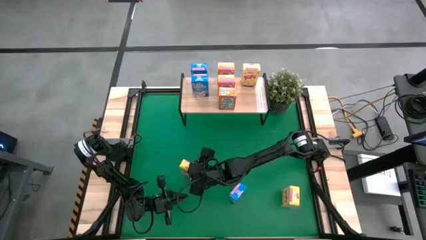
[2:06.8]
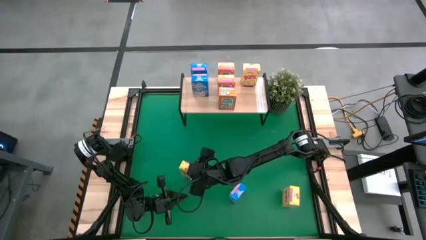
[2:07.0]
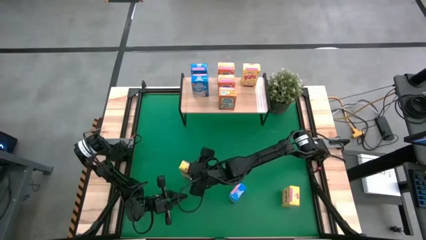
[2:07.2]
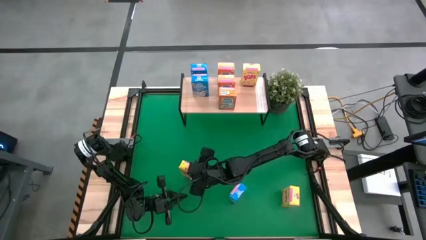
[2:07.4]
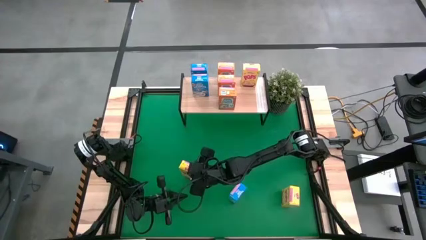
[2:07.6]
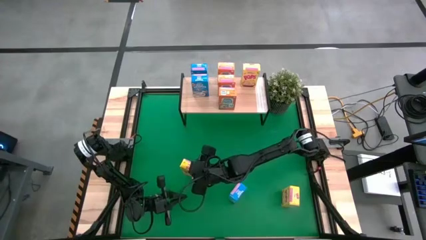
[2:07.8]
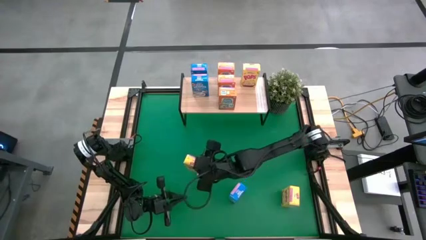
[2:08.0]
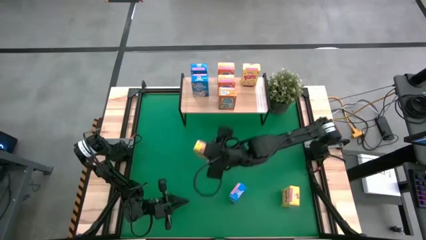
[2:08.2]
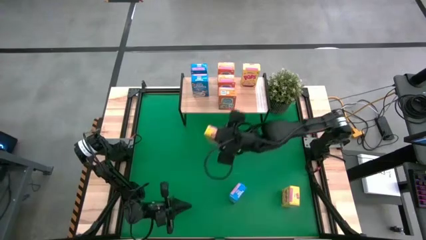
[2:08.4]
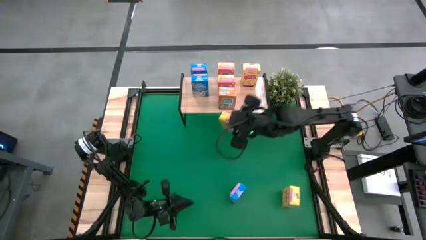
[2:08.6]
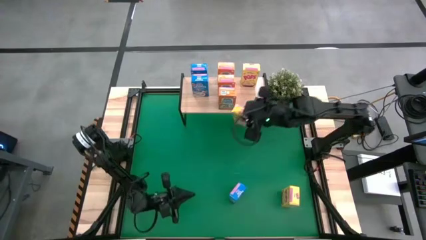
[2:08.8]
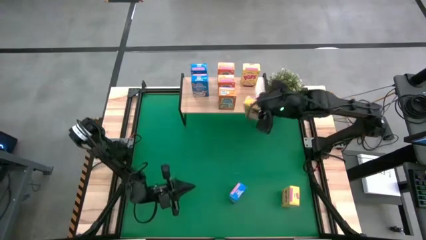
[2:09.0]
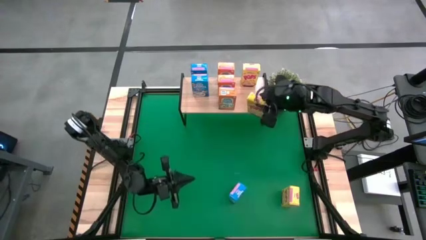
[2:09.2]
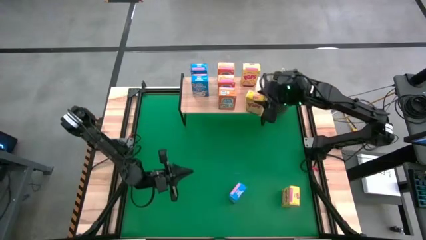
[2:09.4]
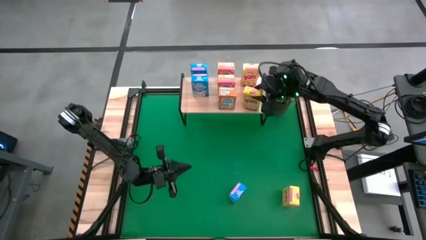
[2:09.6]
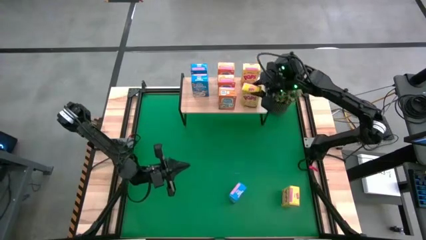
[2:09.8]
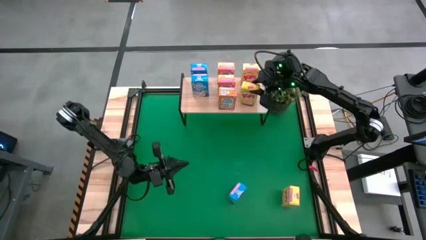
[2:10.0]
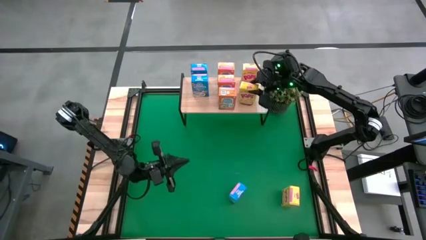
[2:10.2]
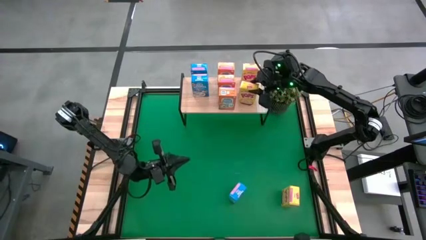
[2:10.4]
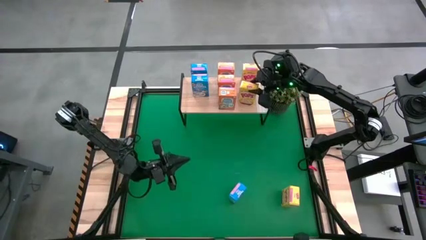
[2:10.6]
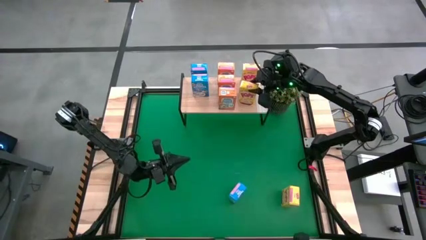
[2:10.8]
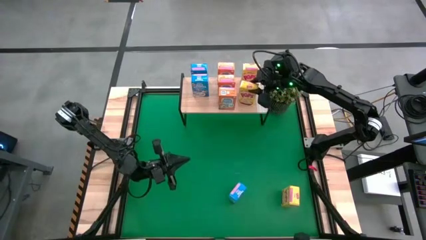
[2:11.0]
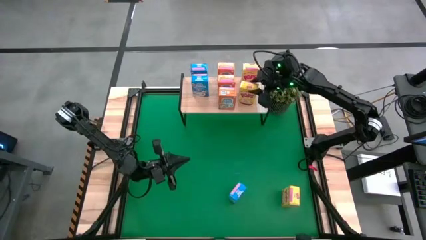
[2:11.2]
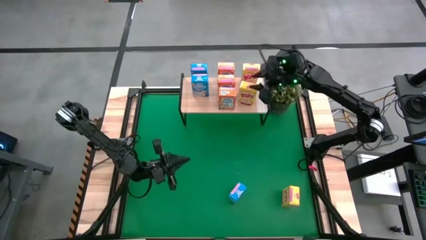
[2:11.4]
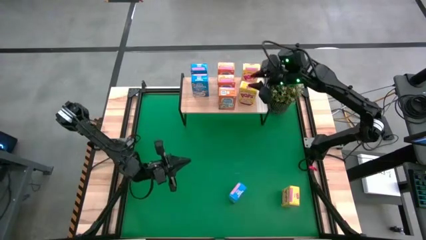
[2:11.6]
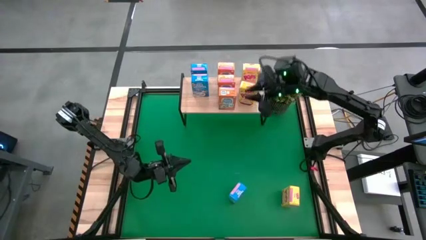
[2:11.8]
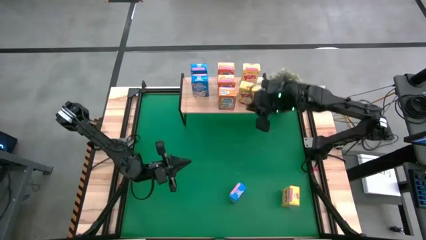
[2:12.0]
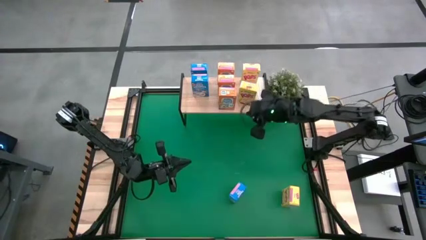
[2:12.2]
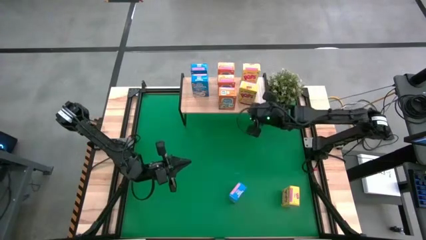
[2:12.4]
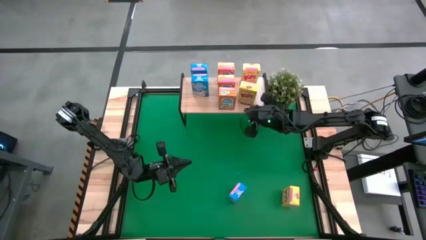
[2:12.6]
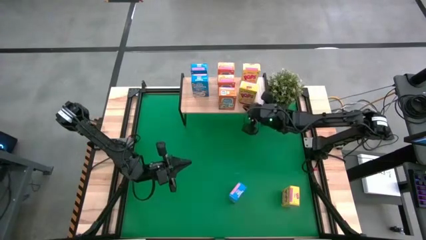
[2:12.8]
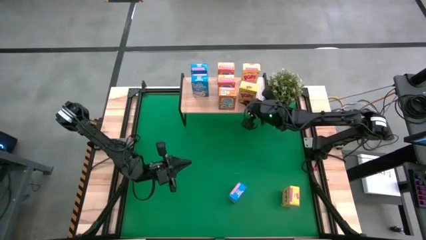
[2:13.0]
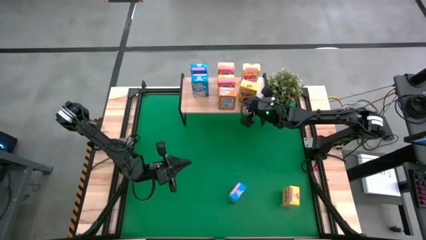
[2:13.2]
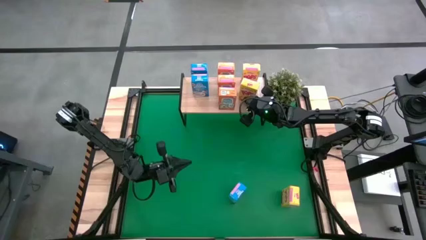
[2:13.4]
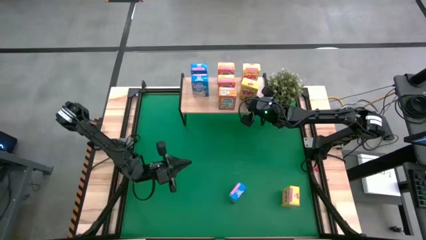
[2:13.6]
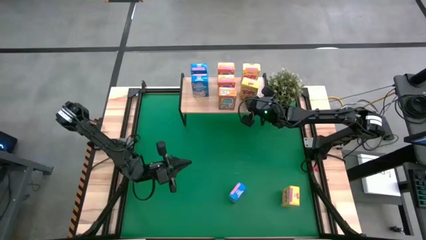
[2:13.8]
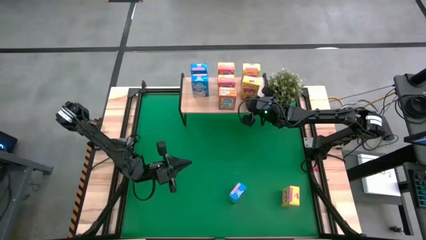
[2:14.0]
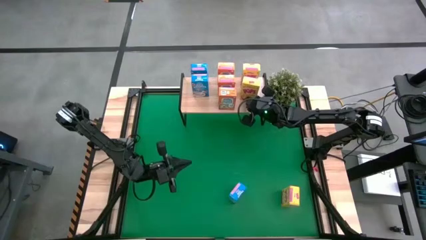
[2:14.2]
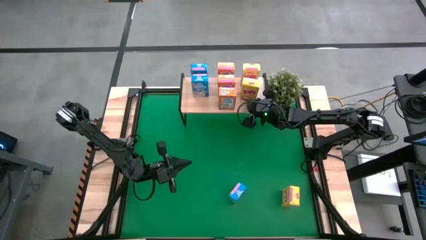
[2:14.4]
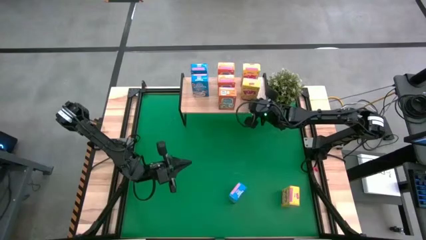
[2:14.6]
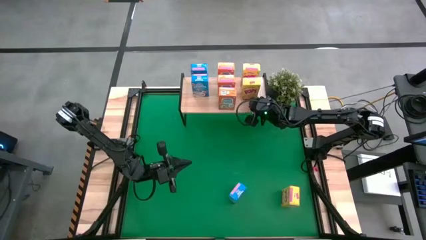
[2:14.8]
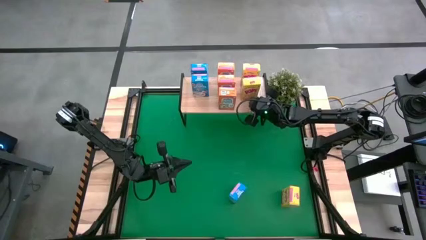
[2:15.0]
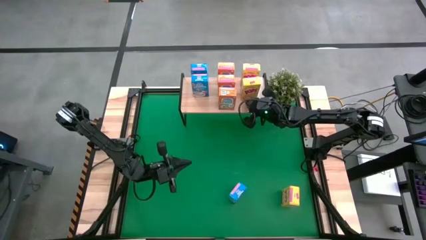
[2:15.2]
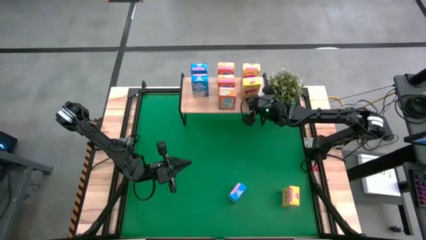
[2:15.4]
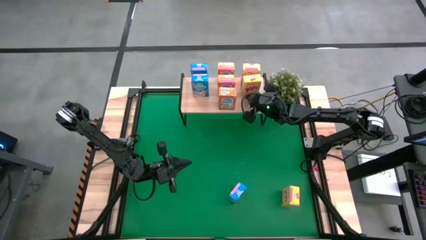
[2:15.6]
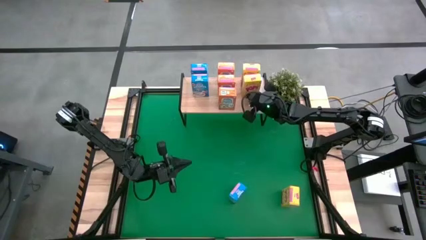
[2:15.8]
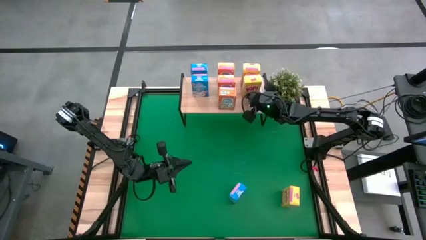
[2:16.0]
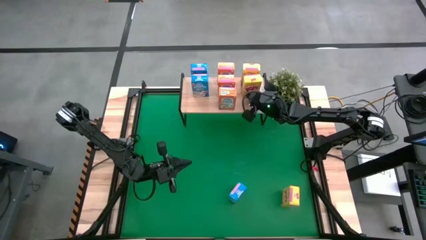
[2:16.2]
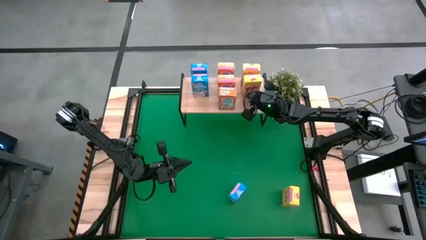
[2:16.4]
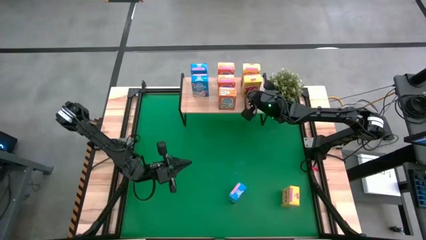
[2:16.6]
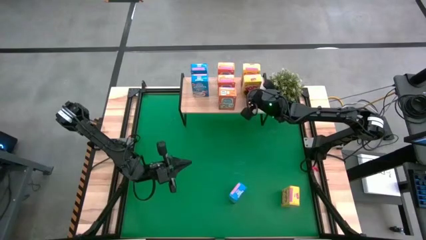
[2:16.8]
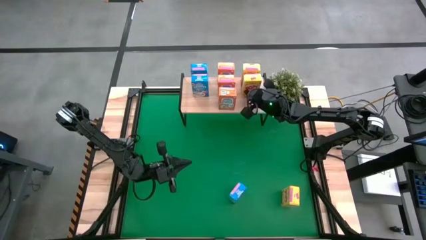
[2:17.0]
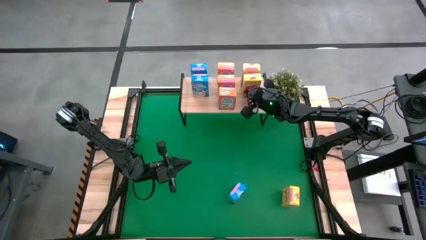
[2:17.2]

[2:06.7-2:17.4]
Task: Stack cereal on shelf
Put the left yellow cereal box on the shelf

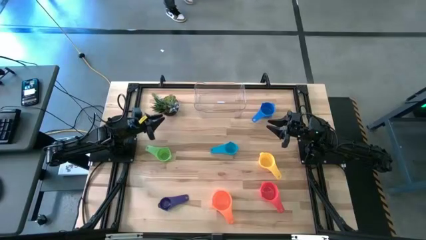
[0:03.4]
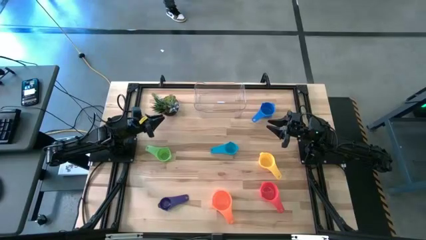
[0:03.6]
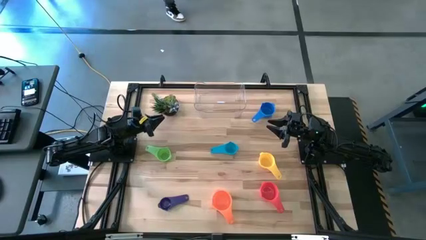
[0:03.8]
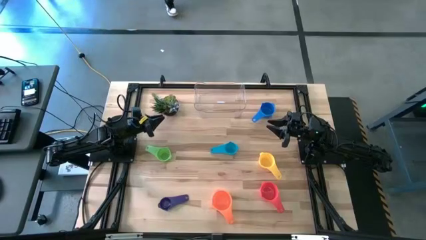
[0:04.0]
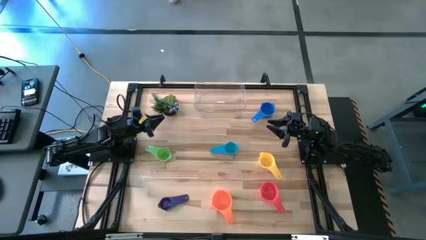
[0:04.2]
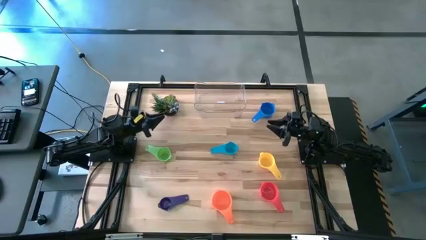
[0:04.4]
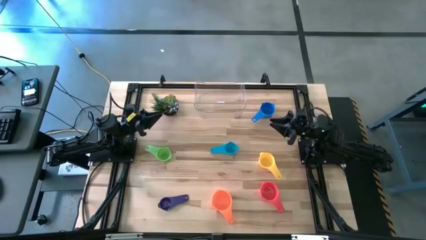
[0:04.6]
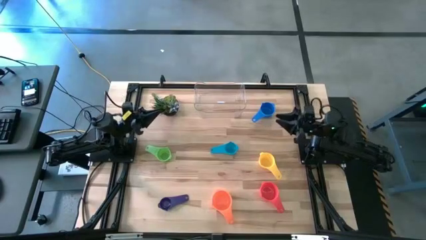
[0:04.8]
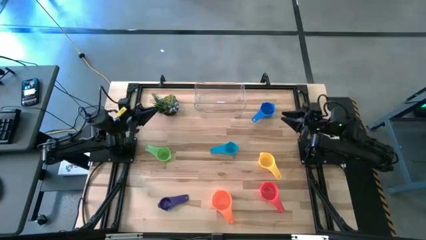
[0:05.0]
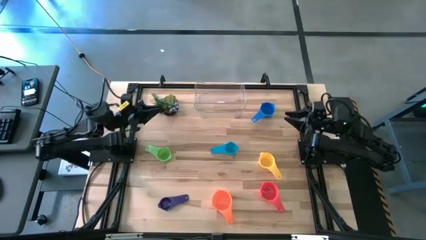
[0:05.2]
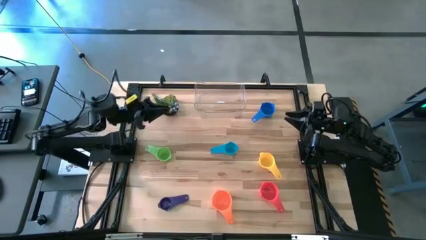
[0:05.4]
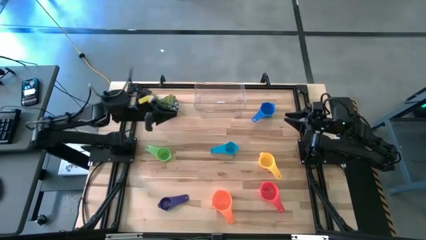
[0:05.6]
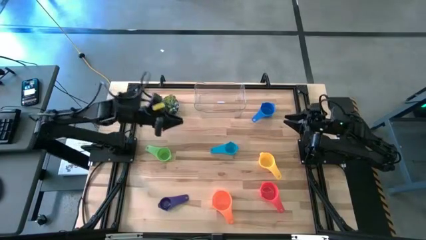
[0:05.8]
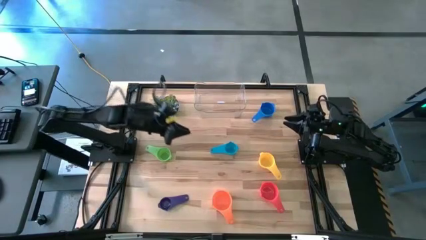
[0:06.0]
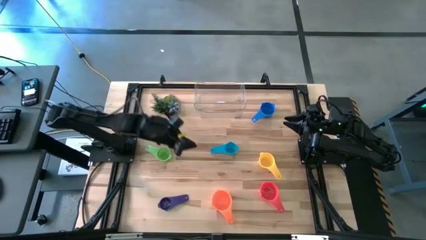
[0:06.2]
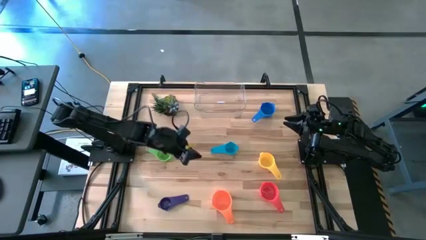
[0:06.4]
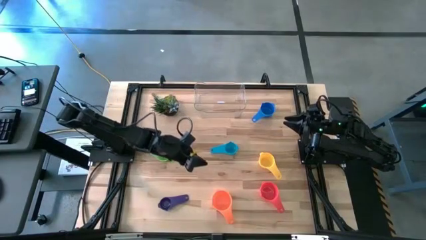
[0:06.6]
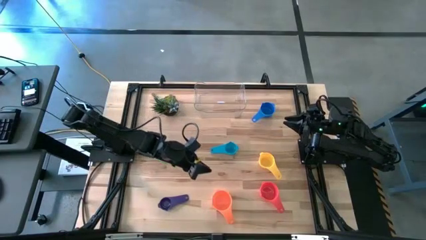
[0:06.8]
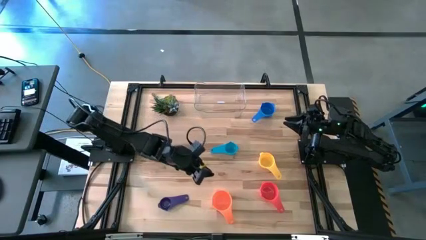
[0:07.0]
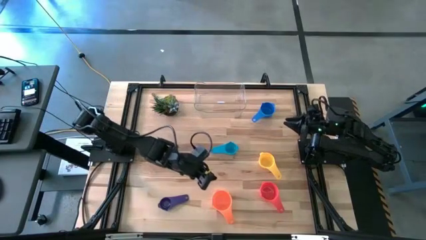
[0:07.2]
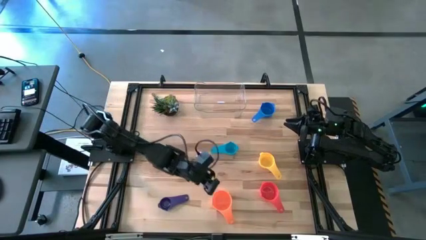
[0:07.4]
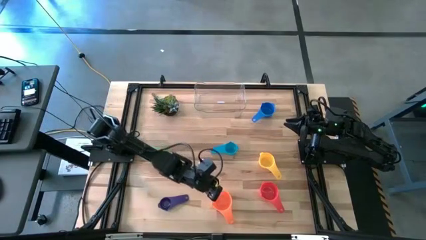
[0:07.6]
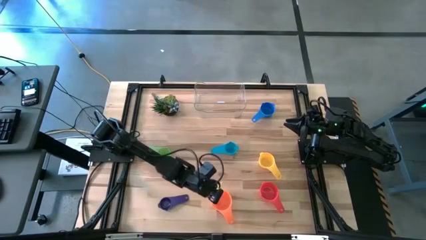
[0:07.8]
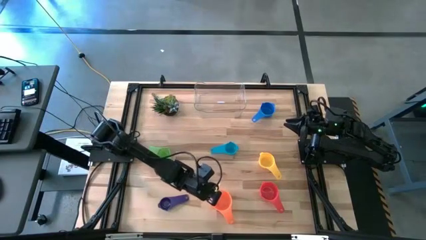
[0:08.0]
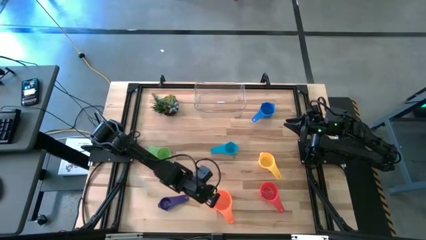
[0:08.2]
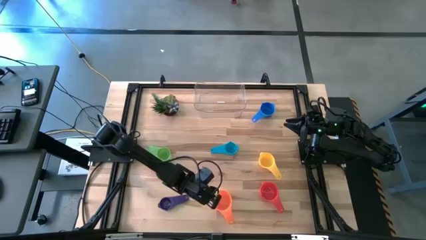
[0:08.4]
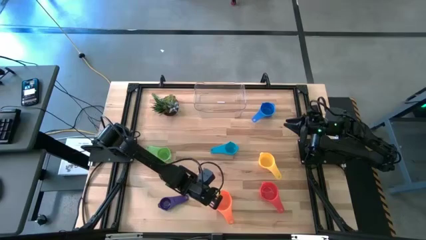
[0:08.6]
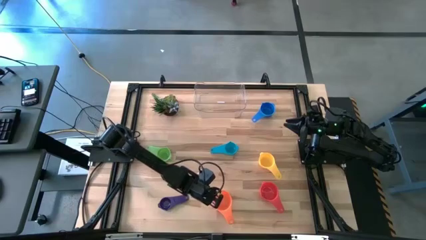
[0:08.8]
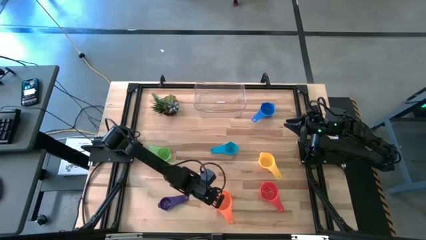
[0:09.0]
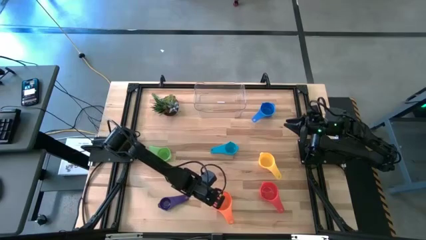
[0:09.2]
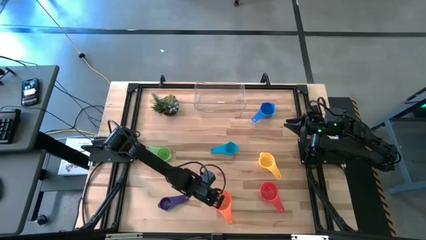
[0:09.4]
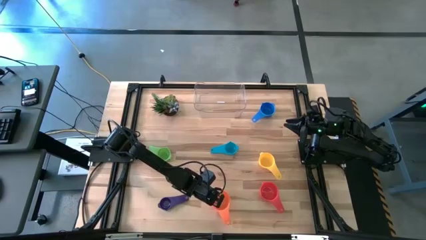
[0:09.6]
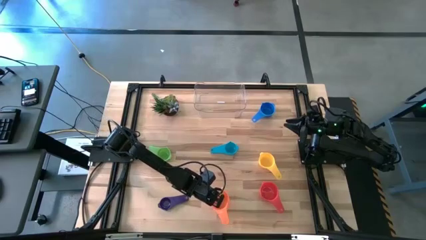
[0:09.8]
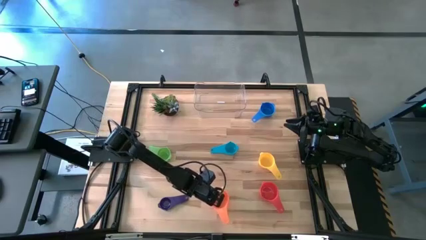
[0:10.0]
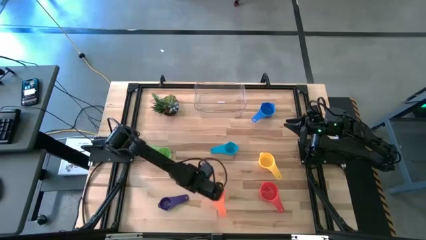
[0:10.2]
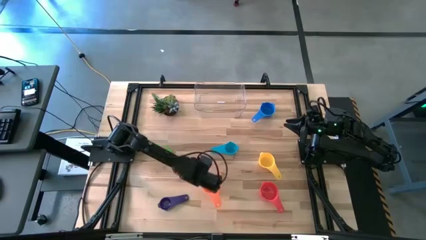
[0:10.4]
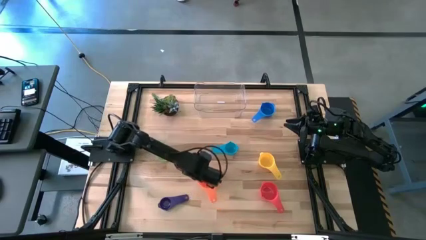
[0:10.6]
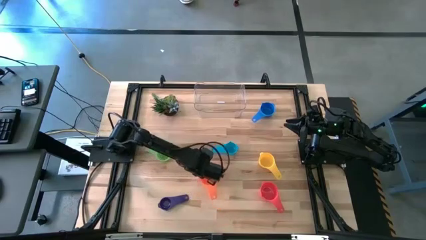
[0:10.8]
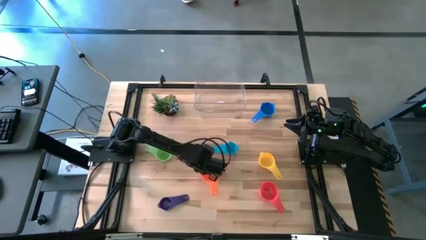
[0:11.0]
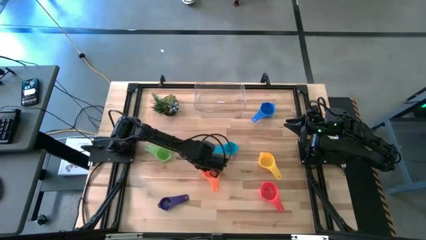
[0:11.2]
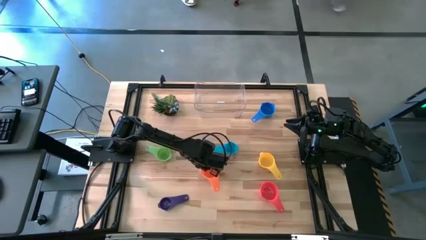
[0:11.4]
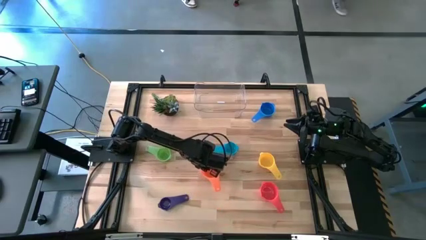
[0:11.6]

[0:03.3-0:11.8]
Task: Nest measuring cups in basket
Move the orange measuring cup
